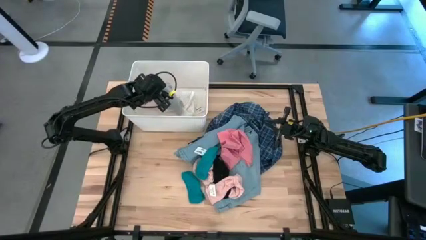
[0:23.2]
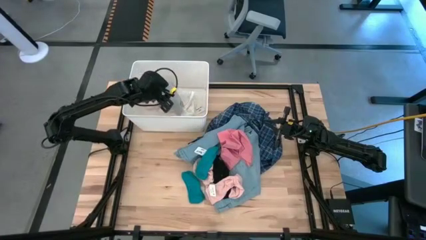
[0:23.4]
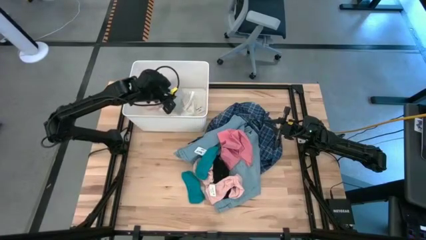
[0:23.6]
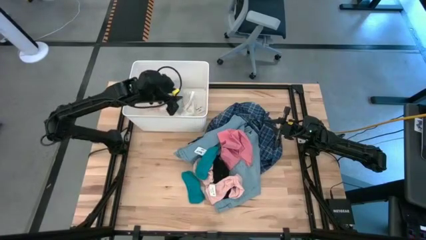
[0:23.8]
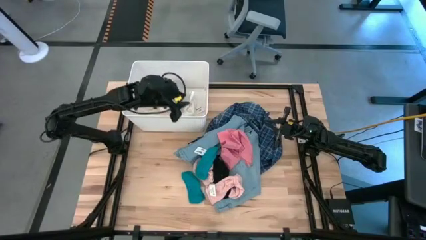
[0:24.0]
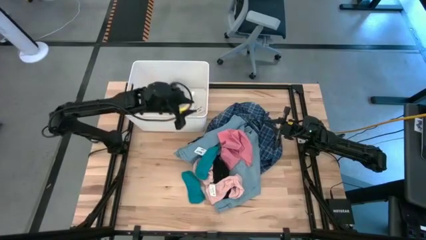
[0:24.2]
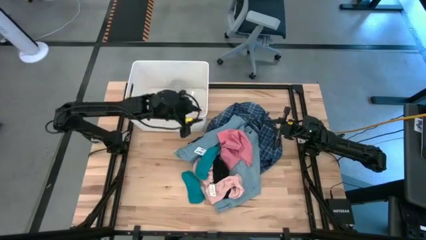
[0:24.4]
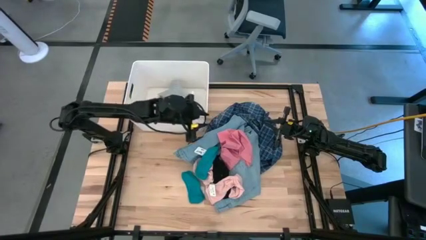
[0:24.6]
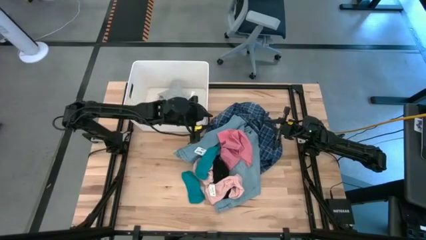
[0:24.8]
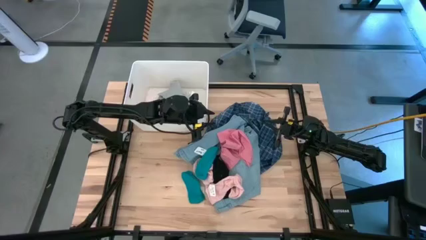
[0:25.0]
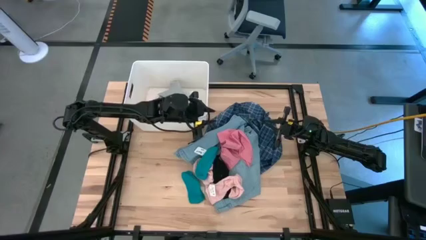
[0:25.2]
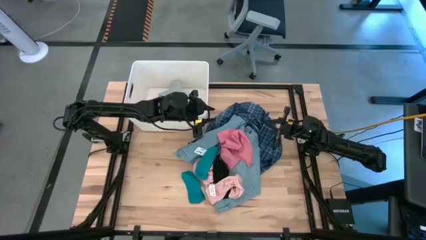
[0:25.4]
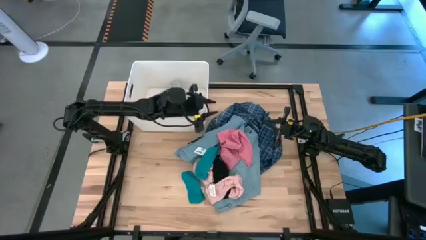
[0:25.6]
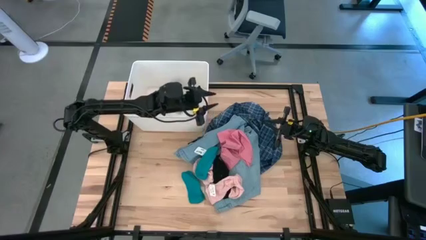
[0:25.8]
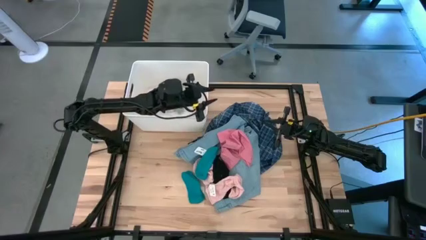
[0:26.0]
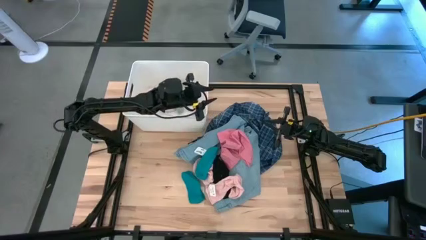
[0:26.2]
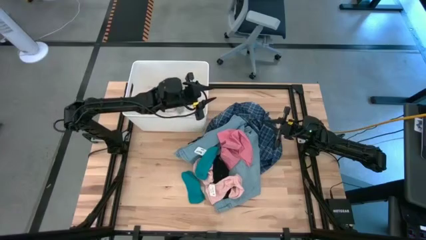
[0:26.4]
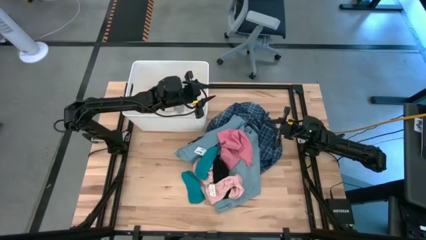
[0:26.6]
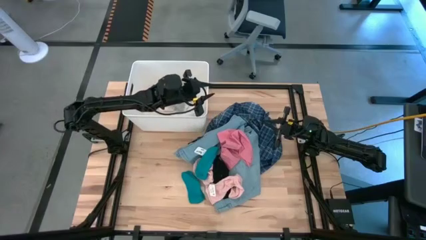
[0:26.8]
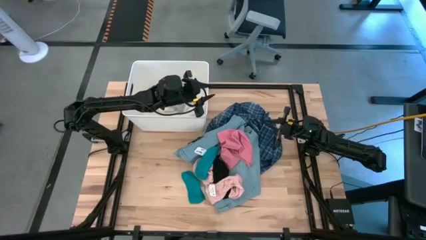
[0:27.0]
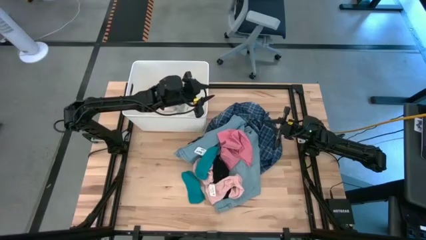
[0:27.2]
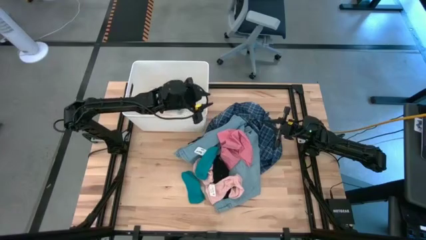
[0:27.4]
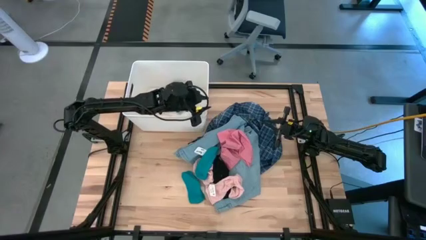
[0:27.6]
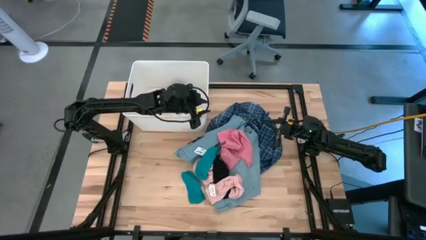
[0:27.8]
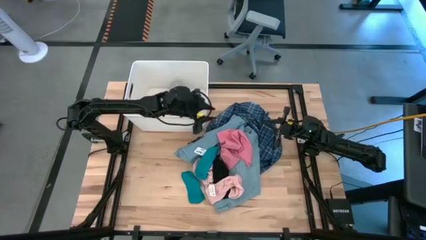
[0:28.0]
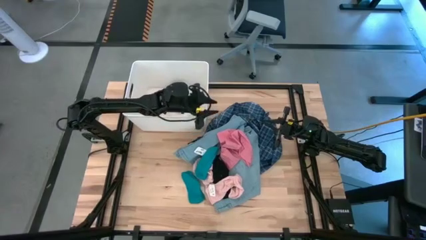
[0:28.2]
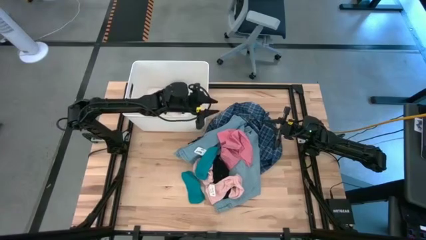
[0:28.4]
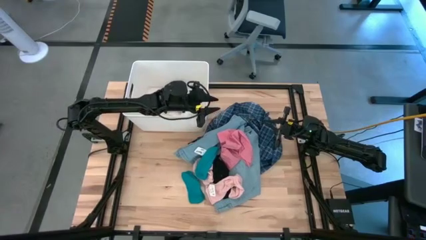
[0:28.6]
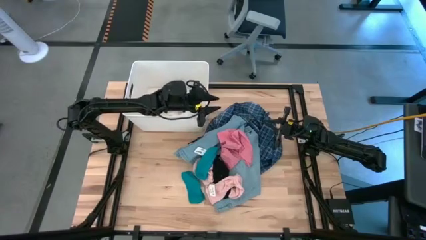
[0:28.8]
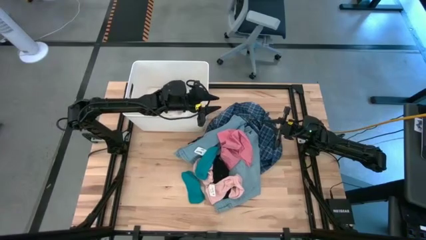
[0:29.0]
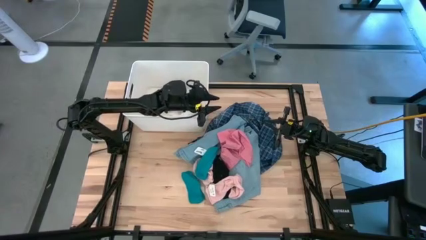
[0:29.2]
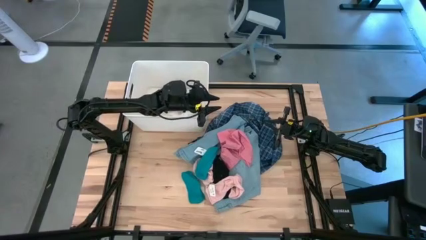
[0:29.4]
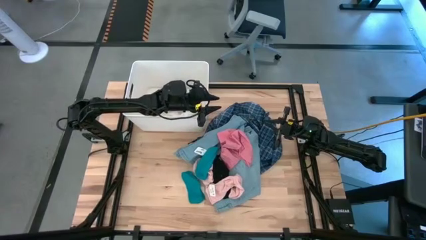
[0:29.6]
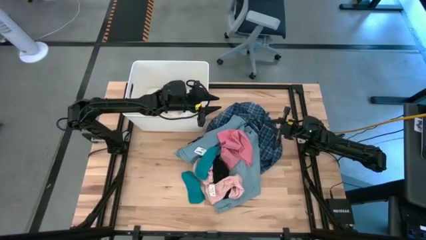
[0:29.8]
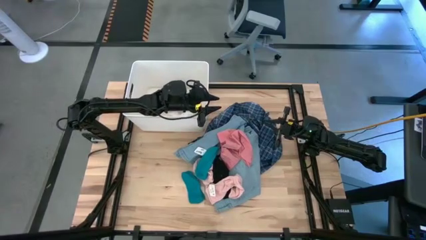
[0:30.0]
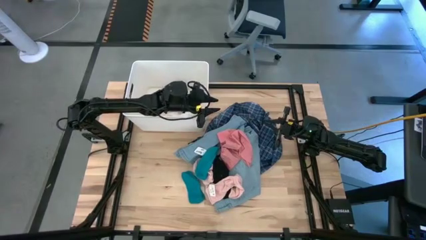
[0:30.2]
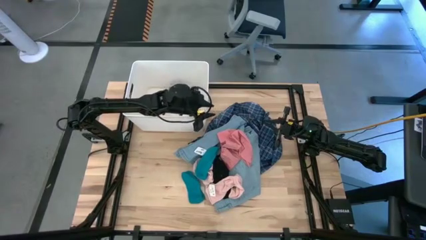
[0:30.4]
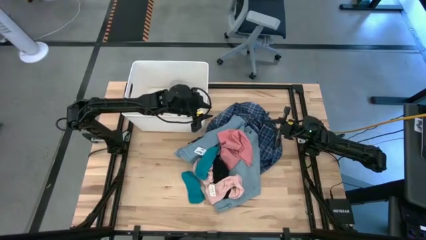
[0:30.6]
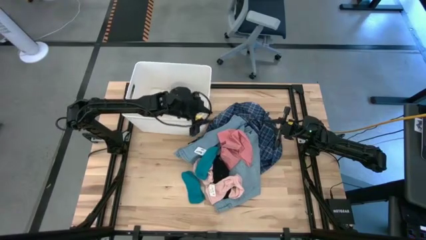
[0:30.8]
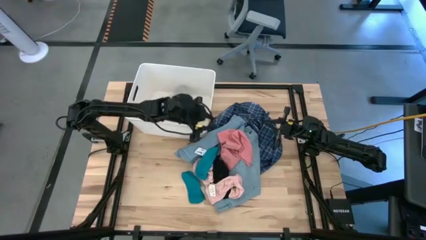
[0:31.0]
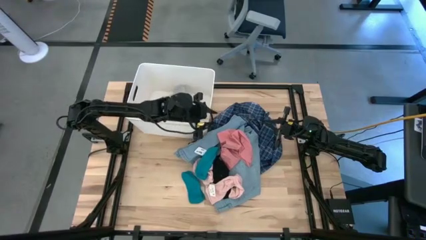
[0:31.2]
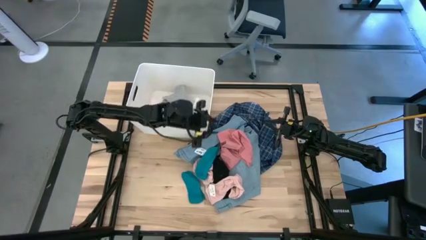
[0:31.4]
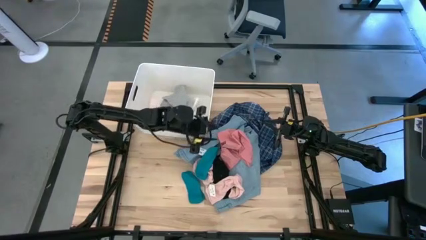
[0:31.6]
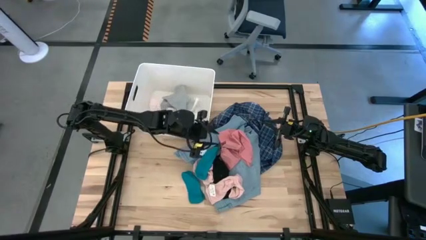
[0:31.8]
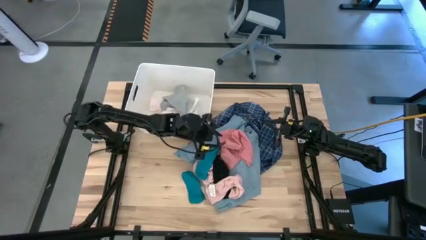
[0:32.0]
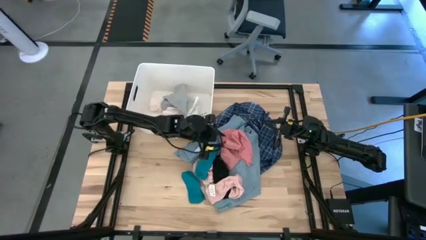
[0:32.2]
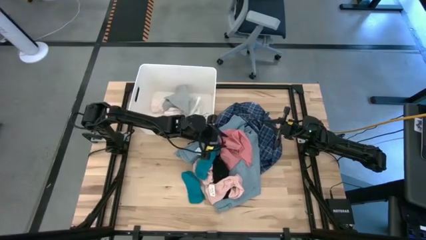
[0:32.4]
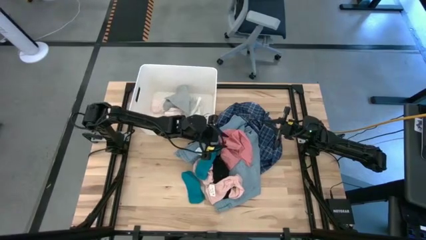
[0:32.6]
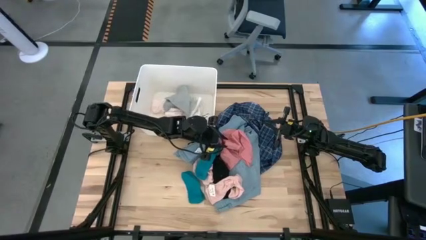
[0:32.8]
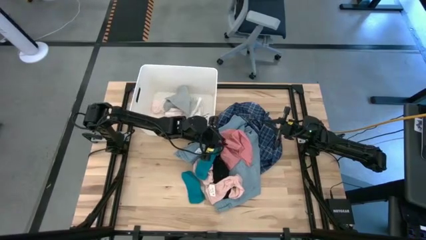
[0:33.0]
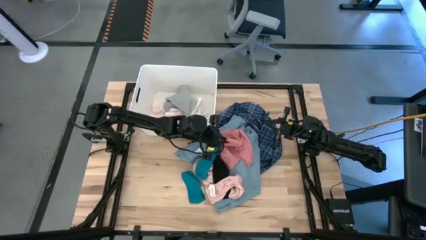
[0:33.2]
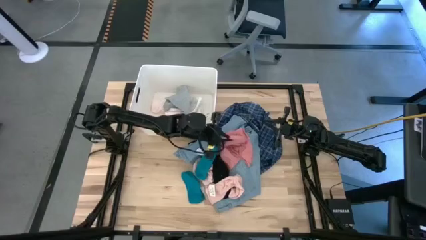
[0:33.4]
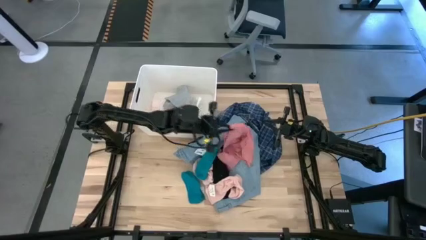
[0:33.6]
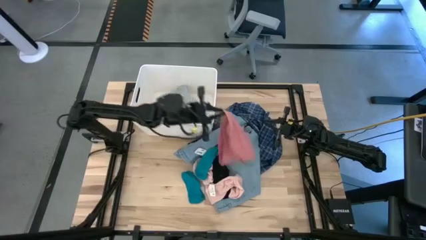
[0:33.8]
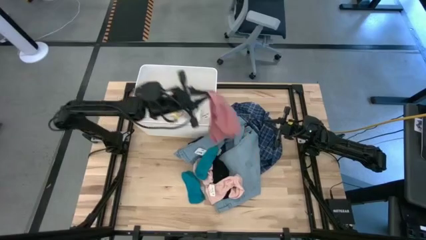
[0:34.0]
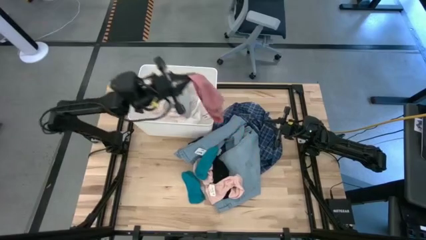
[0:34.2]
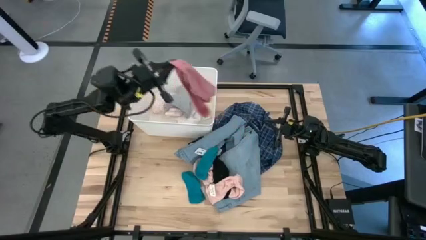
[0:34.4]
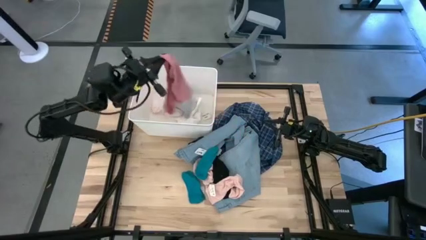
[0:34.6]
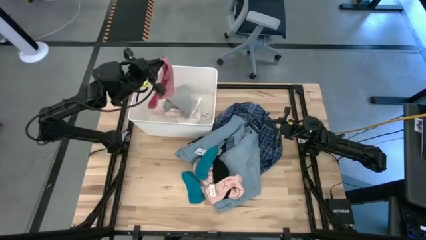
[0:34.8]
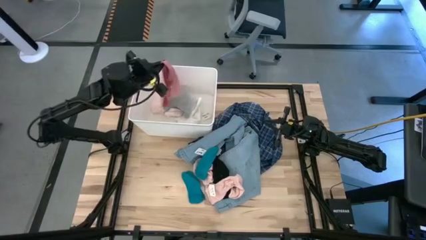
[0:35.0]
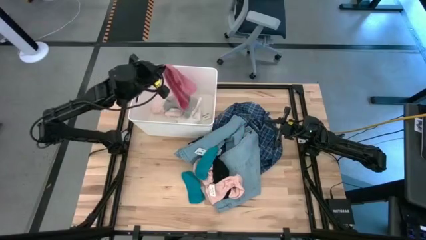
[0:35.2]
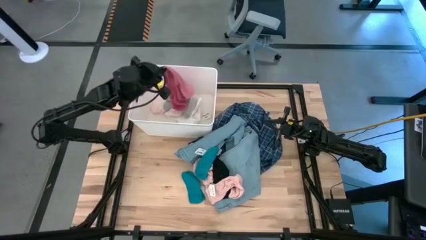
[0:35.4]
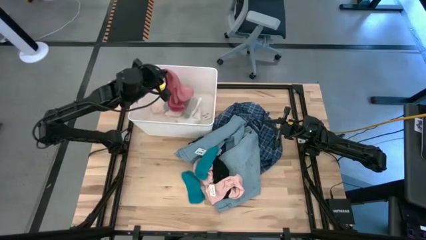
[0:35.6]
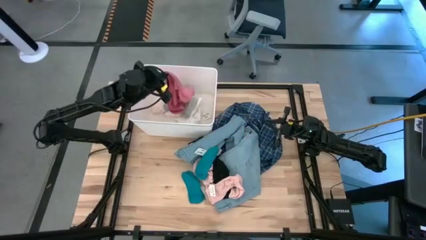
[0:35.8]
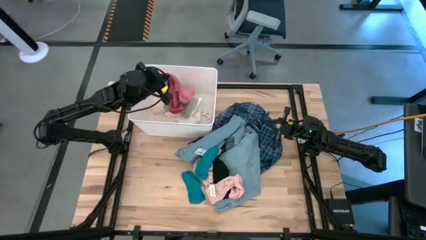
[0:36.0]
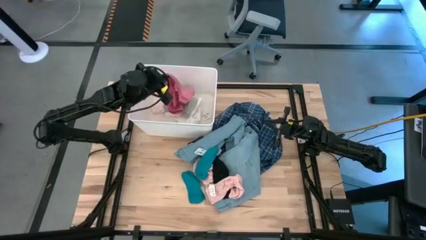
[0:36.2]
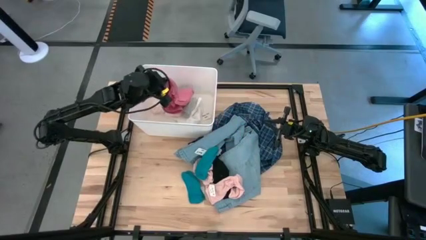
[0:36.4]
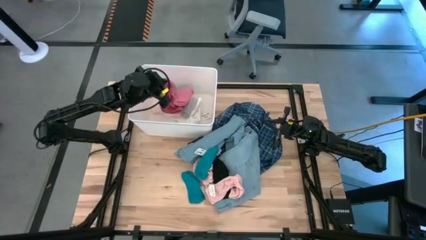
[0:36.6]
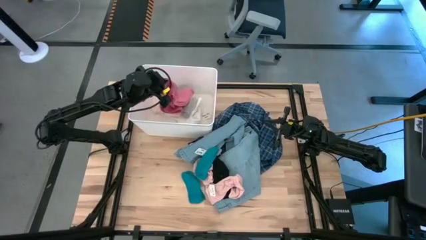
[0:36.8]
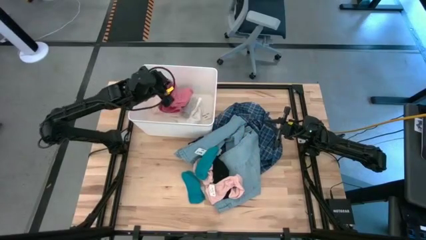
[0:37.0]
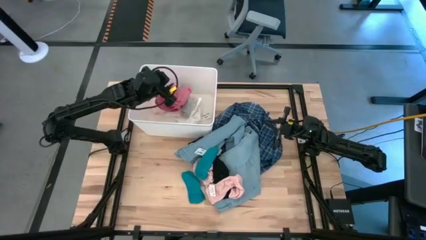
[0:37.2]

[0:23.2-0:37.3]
Task: Sort clothes
Put the pink underwear into the white laundry bin

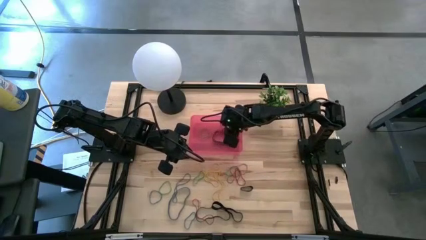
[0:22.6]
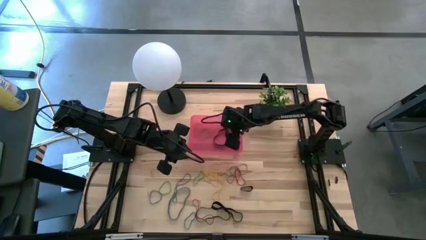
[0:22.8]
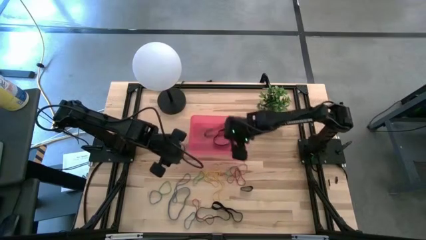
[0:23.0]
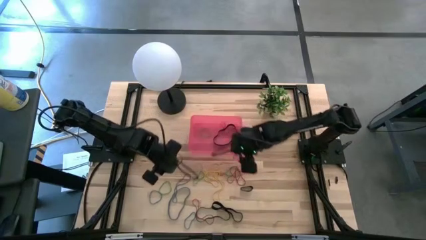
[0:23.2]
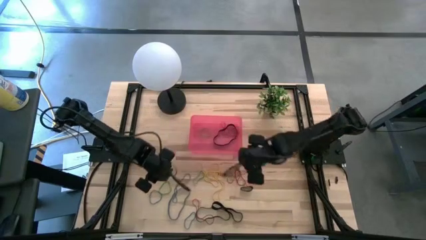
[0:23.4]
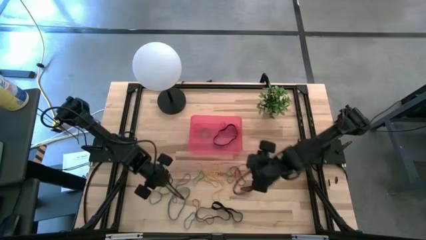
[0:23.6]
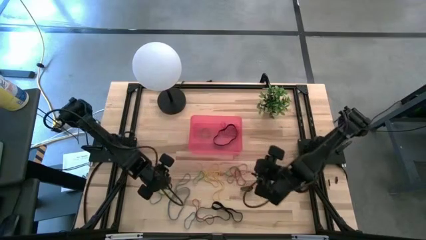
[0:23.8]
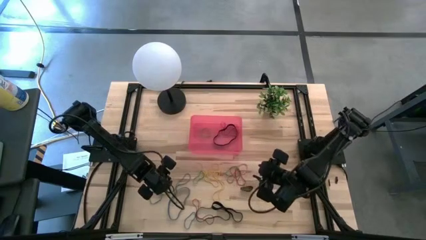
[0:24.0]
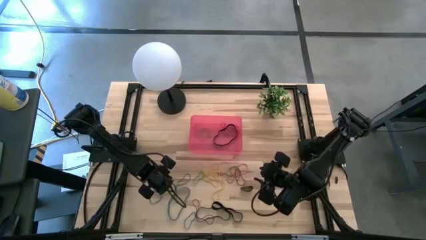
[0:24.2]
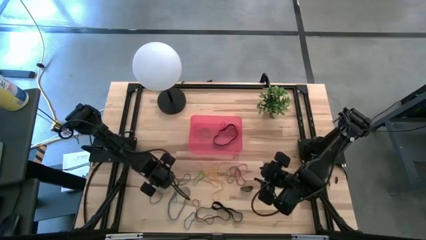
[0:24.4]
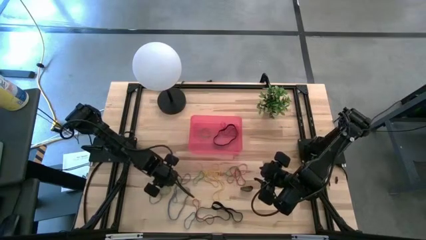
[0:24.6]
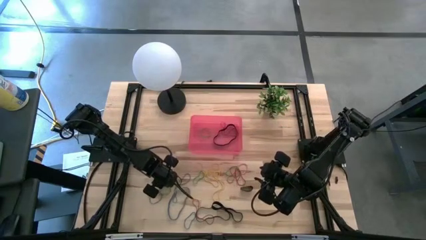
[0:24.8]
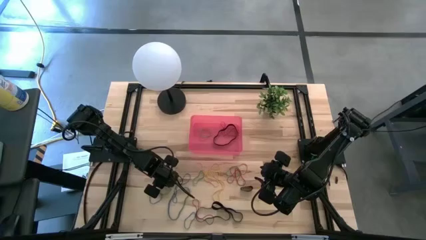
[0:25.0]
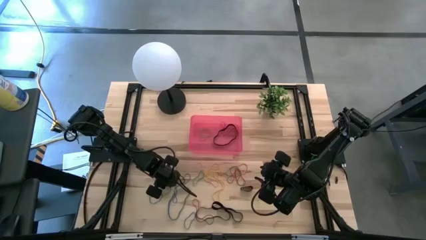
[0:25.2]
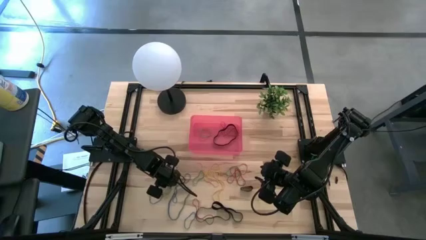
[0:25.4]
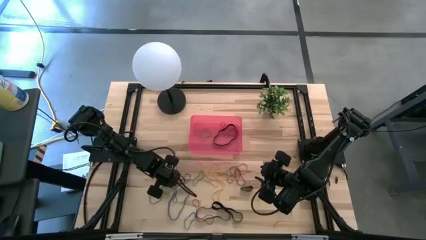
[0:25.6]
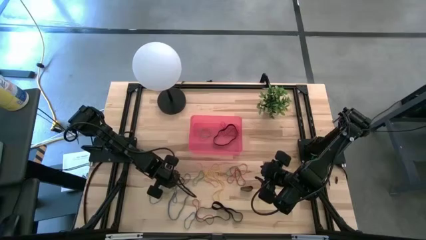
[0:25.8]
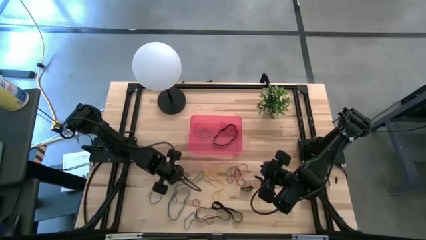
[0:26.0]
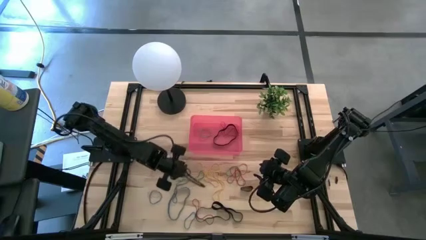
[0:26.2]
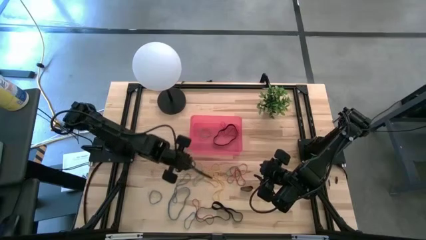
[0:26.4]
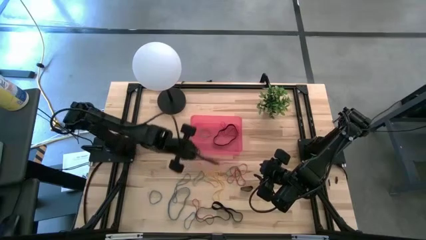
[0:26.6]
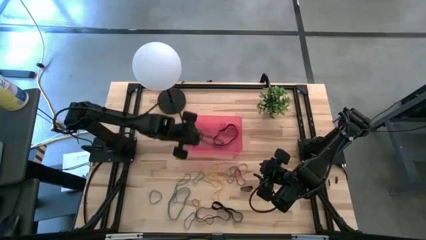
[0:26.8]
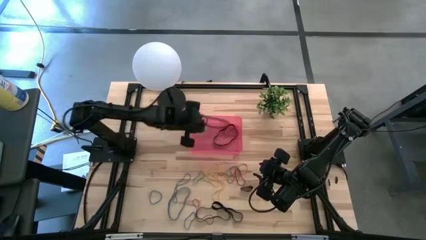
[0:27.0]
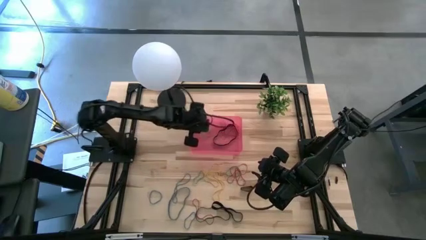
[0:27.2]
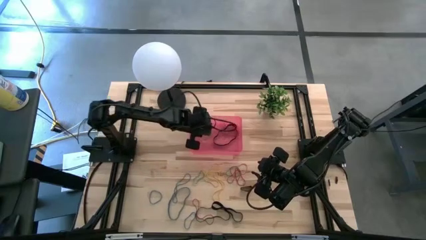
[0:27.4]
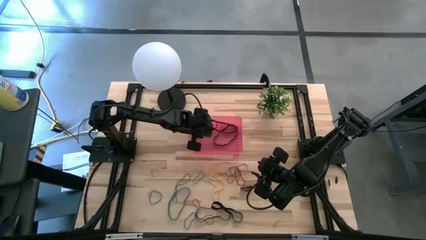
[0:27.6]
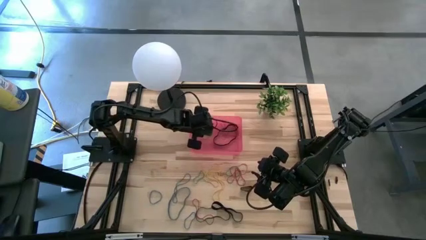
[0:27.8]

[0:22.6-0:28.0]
Task: Pick and place rubber bands into bin
Put the green rubber band into the red bin
